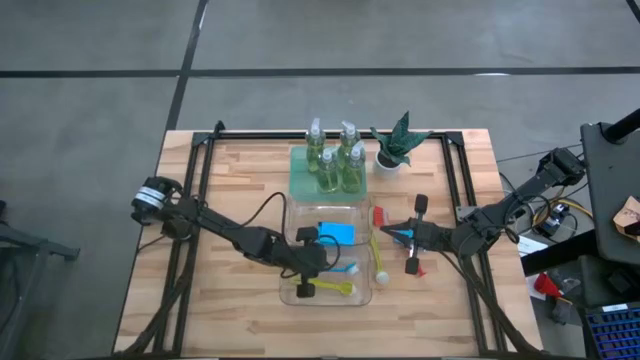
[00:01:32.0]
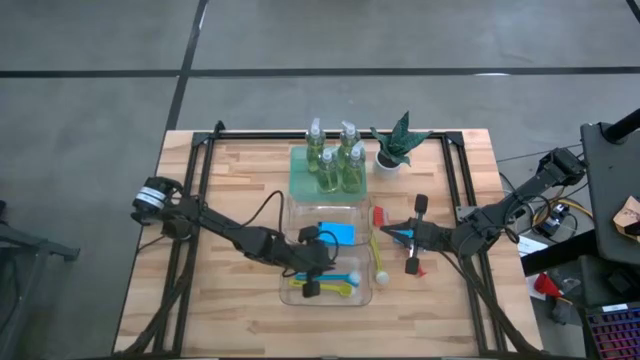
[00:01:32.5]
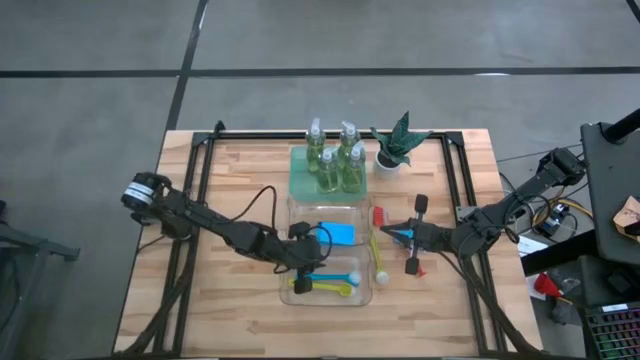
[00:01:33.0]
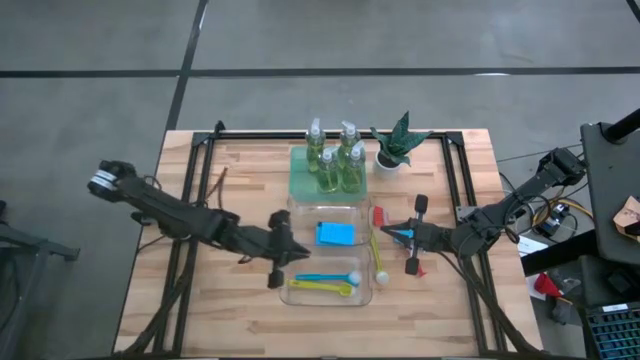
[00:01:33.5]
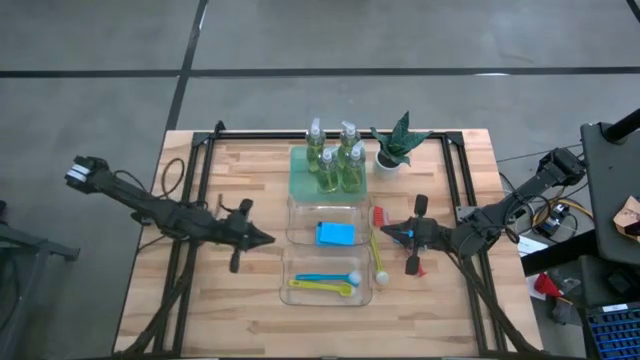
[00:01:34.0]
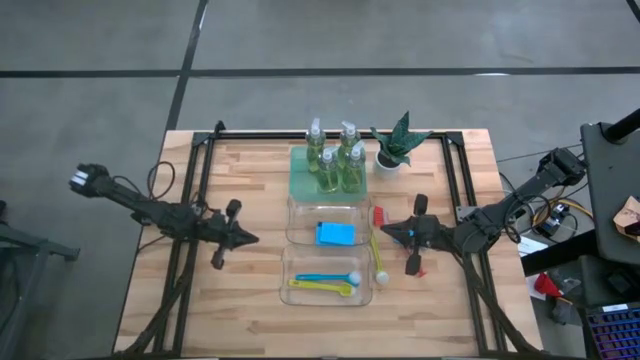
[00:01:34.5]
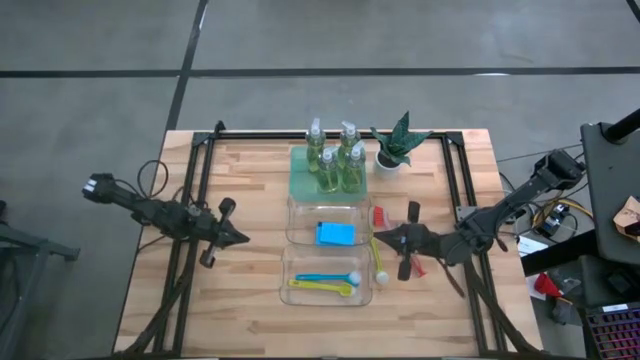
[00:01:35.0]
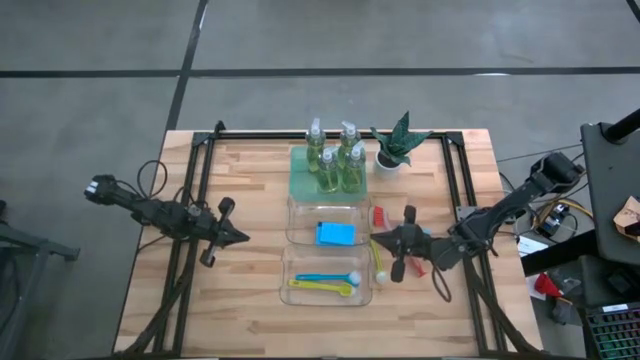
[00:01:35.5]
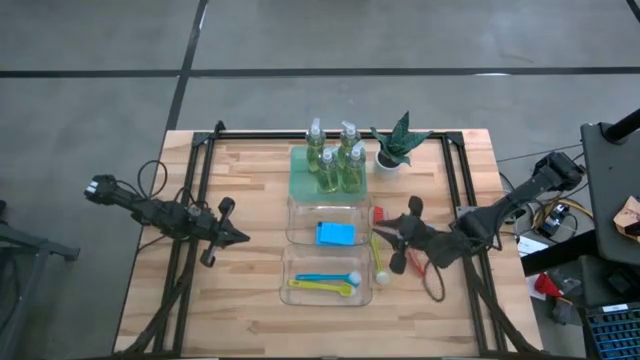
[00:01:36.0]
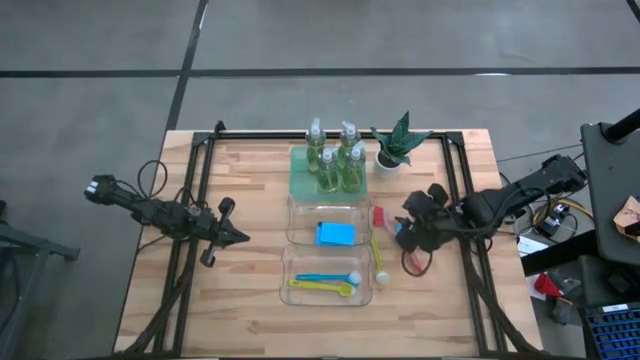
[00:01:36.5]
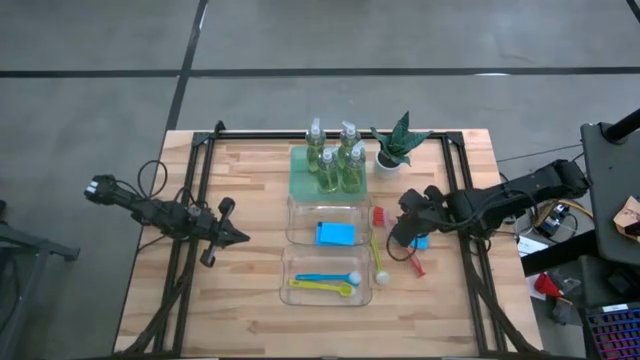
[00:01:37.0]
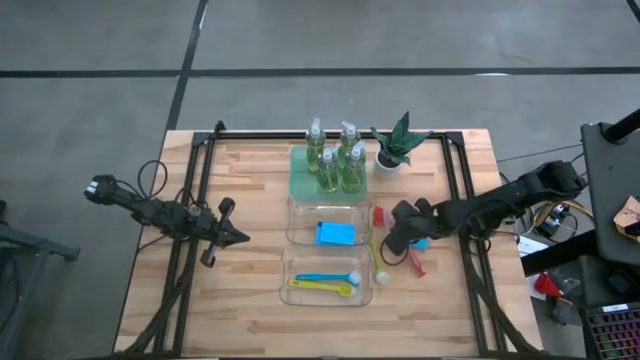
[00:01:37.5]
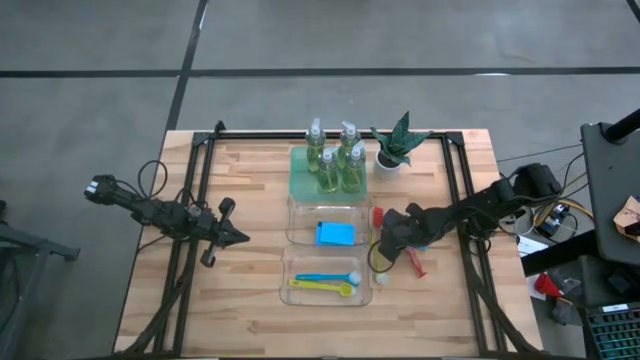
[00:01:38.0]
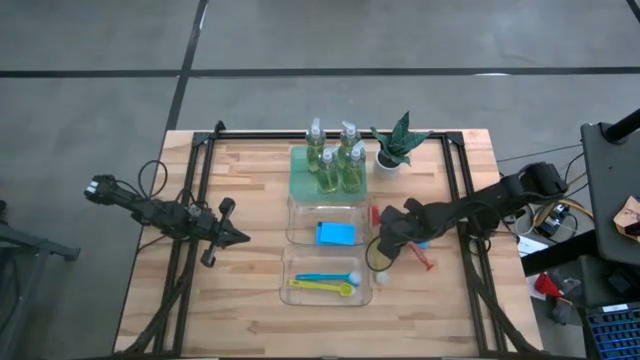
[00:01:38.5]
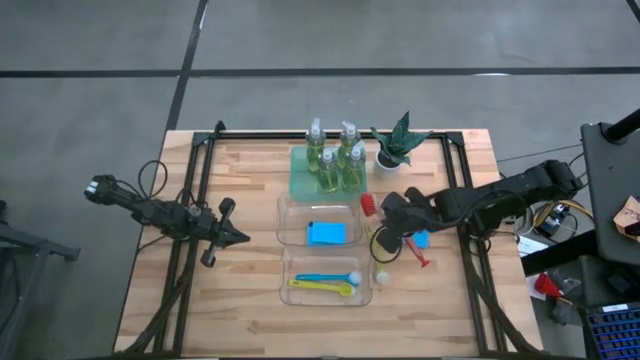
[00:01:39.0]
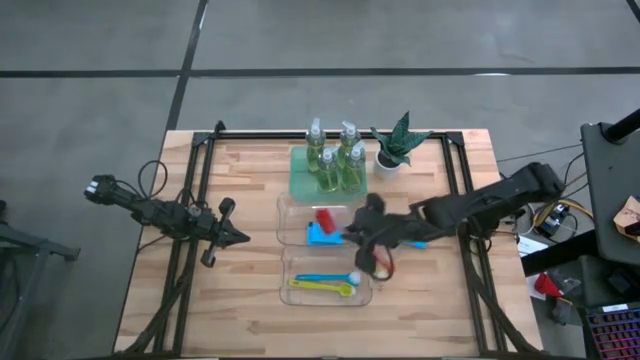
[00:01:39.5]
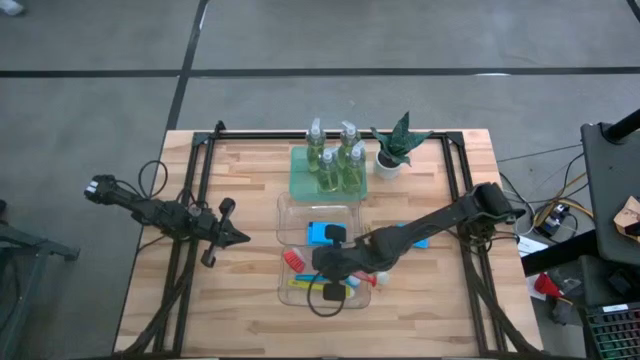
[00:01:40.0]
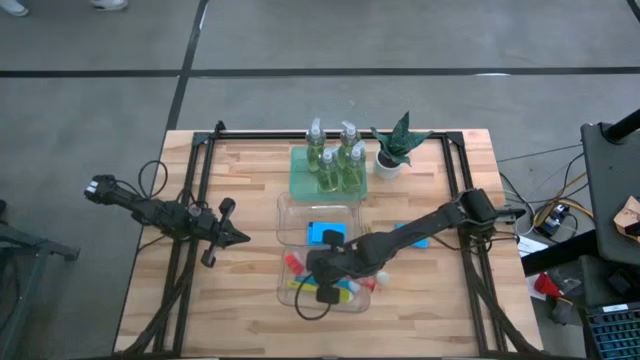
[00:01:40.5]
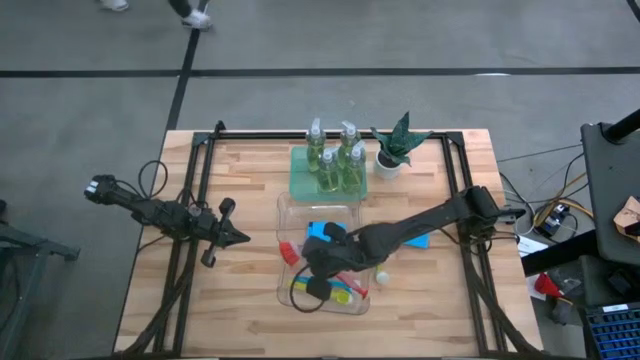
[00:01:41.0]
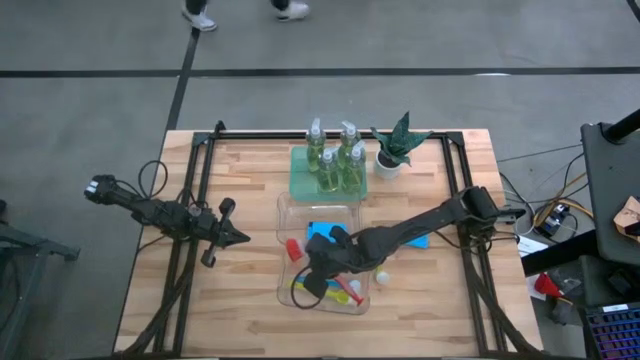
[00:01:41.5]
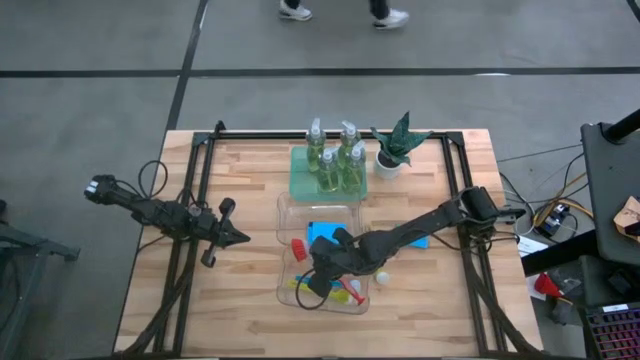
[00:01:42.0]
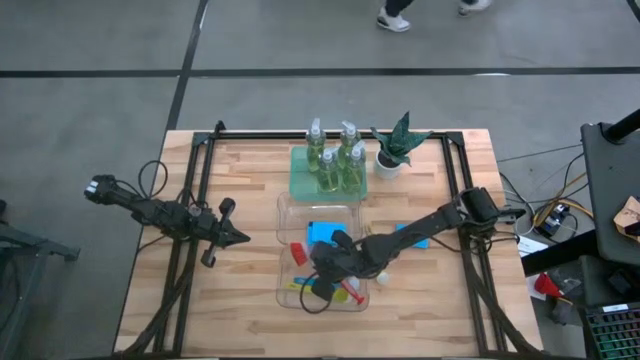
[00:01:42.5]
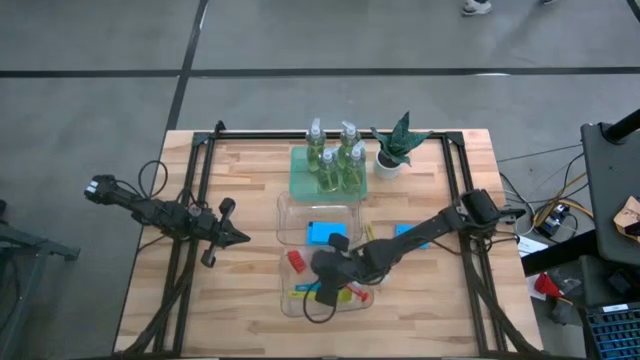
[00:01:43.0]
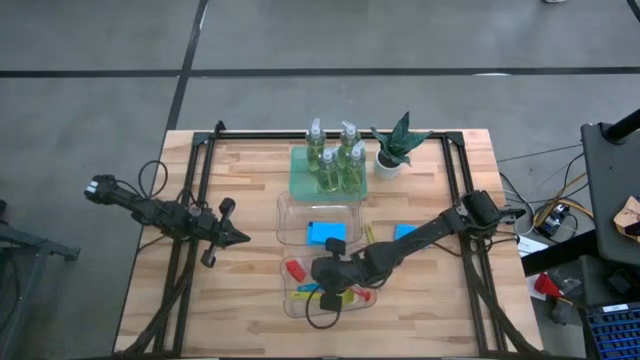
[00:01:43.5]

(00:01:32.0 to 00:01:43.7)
Task: Pick & Place Kitchen Sink Supplies
Put the red dish brush into the bottom transparent bin

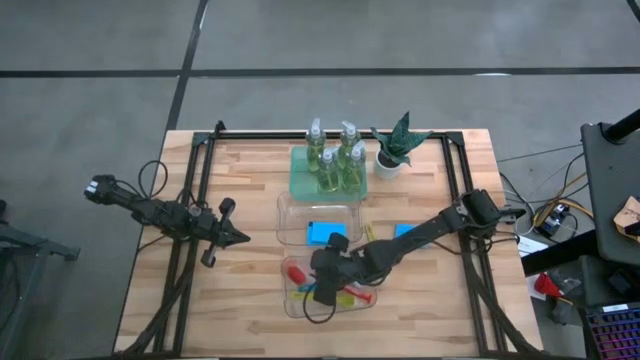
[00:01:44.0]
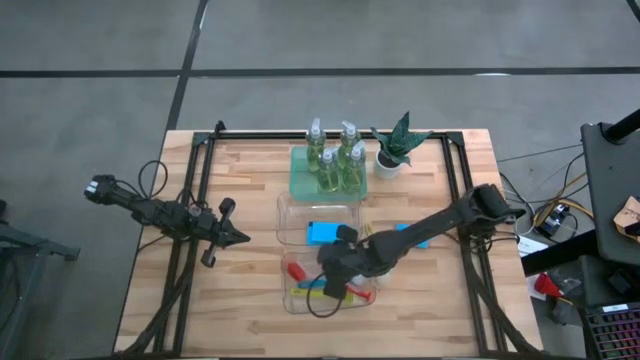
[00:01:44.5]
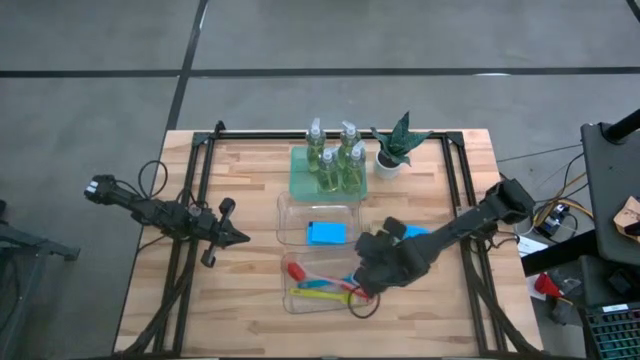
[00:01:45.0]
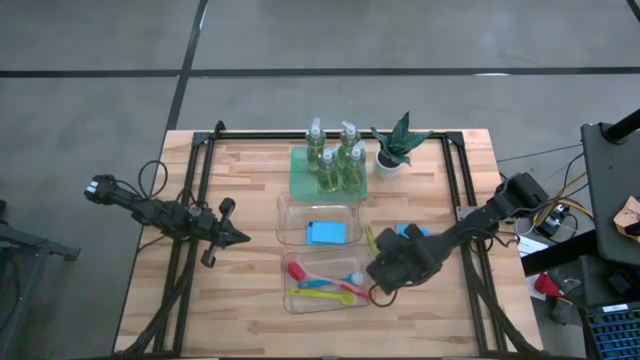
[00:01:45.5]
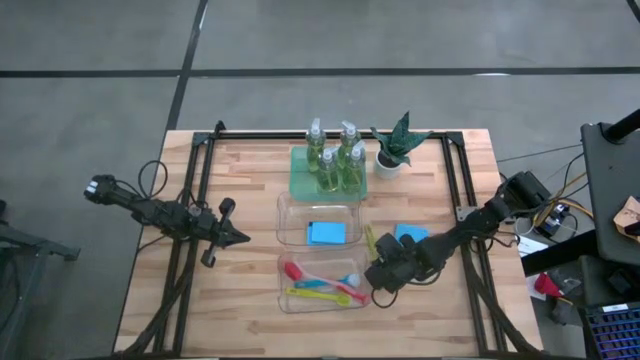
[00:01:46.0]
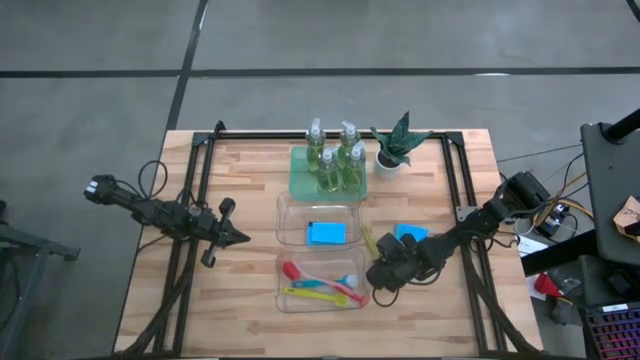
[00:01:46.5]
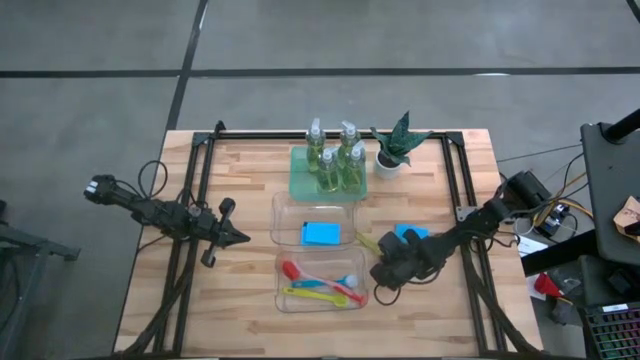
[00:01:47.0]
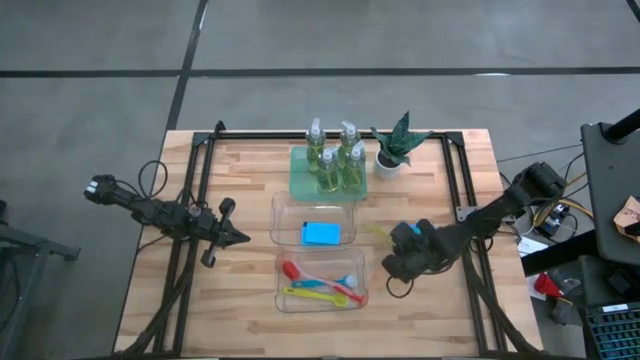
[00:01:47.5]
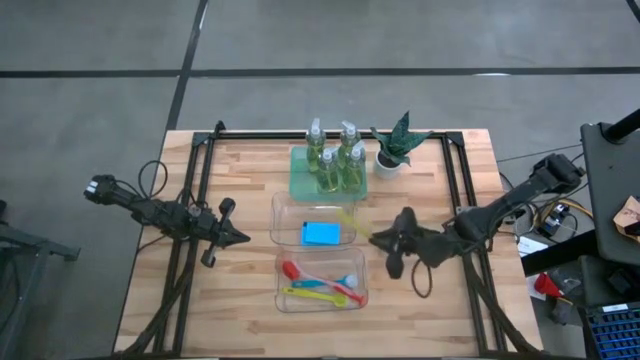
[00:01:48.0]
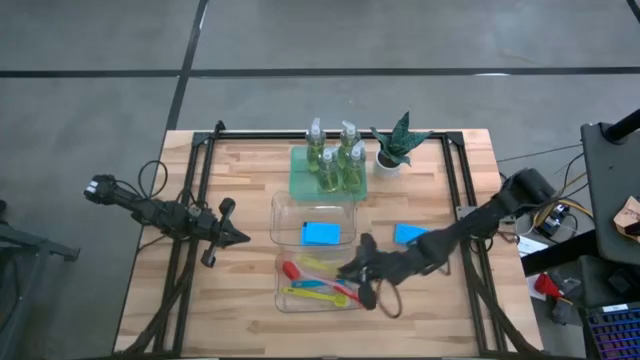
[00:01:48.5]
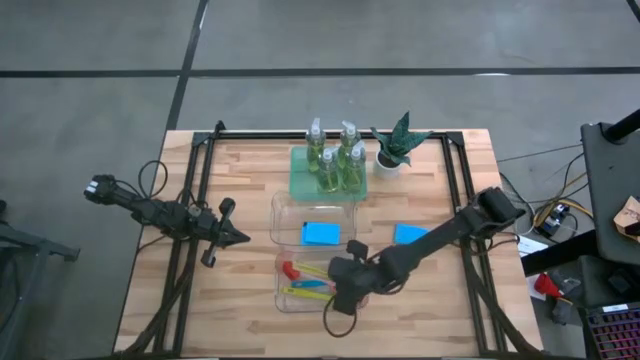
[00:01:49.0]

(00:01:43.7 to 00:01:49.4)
Put the green dish brush into the bottom transparent bin

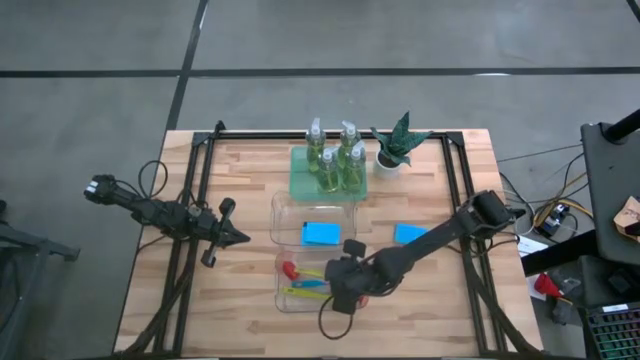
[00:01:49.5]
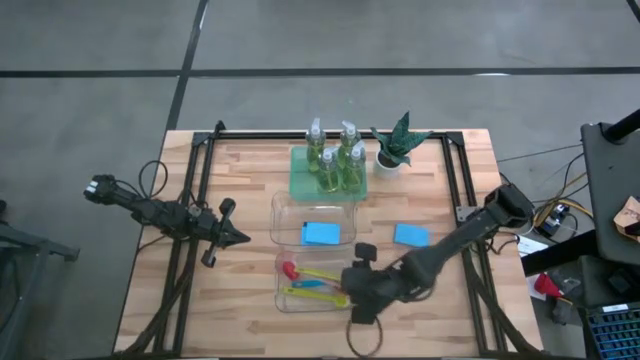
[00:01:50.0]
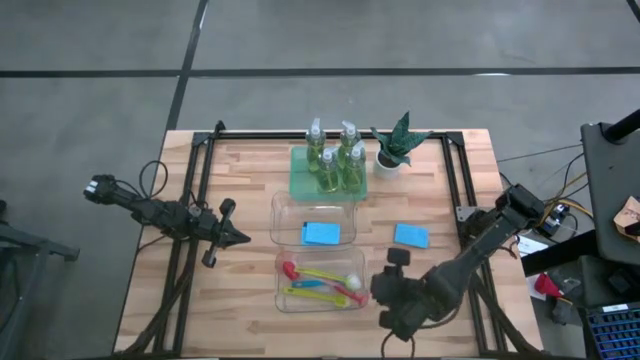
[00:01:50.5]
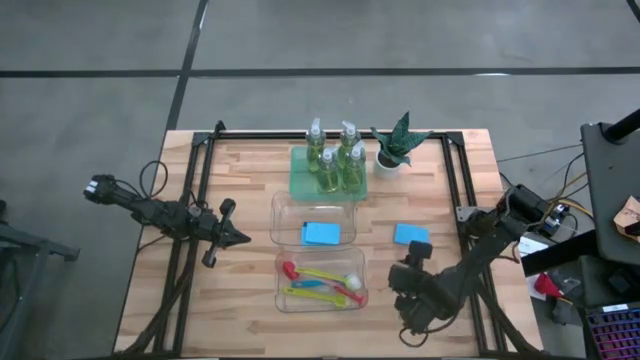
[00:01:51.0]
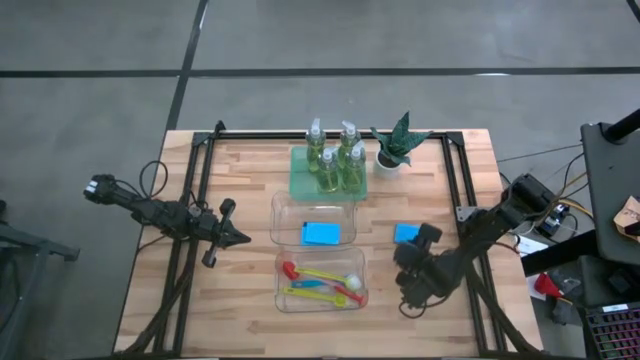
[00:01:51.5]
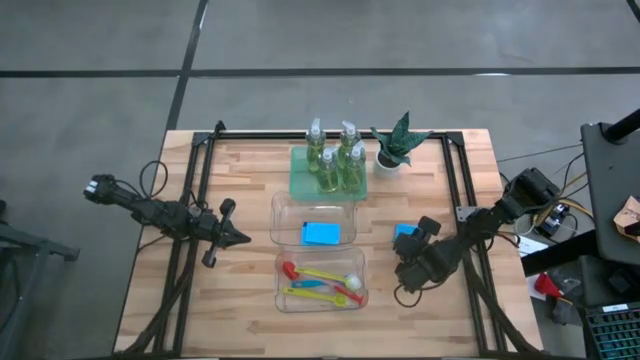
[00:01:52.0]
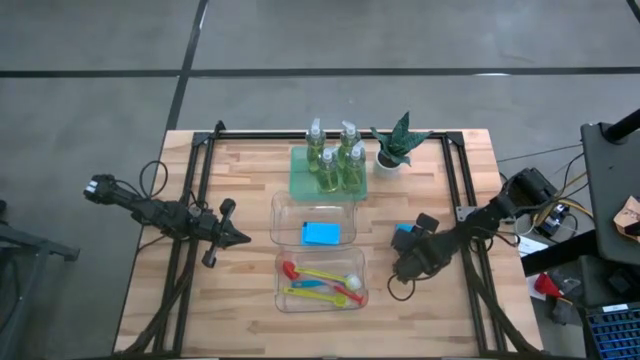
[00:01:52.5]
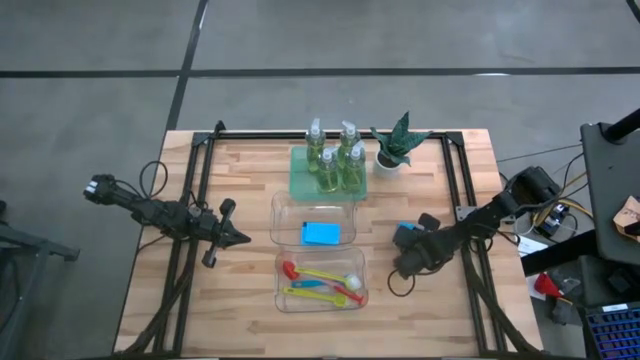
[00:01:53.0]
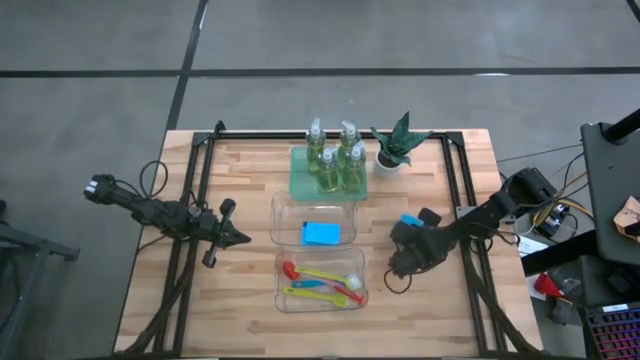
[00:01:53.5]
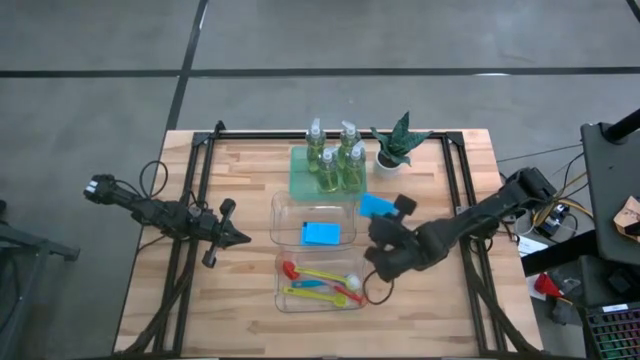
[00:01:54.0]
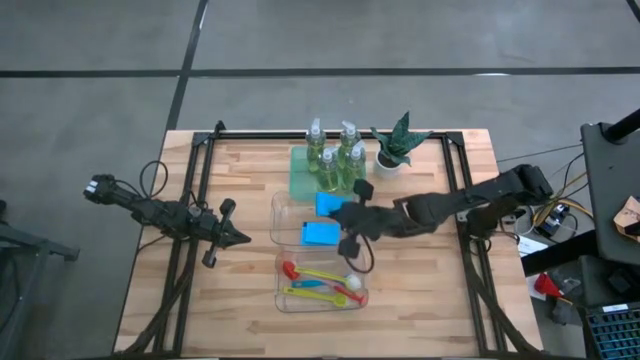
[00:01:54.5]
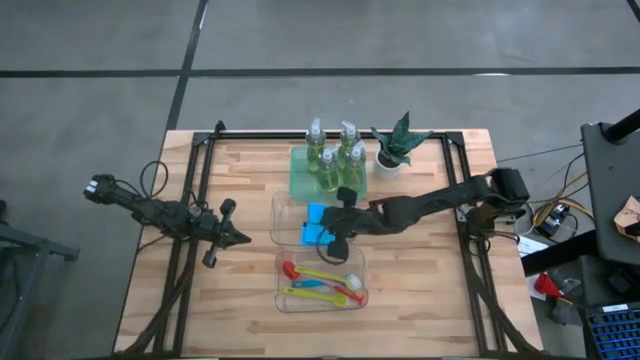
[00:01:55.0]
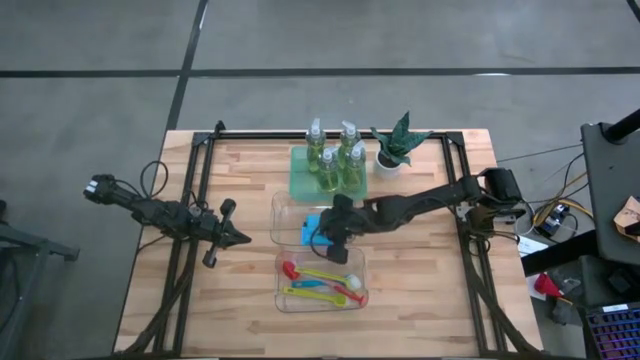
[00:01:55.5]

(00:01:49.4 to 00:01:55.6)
Put the blue sponge into the top transparent bin
